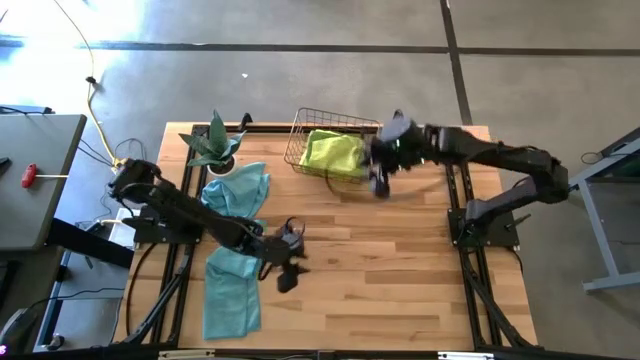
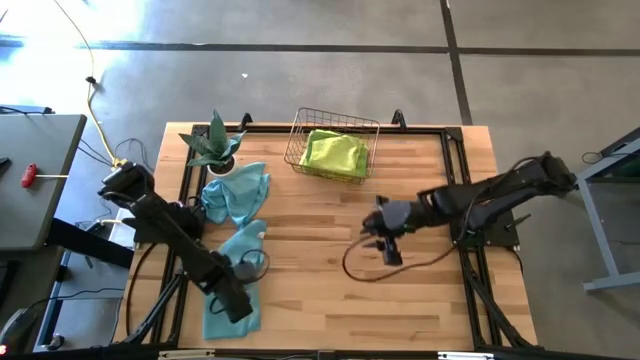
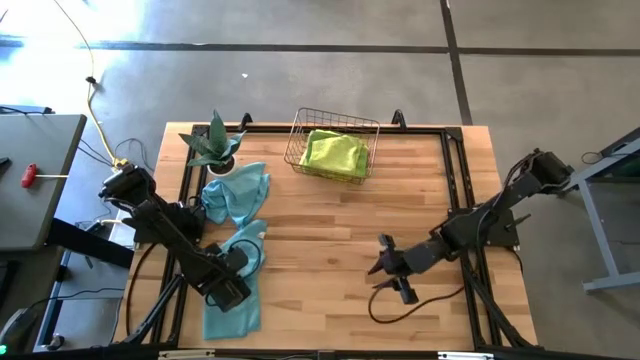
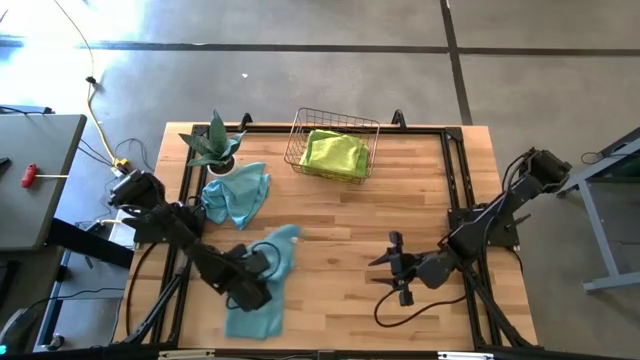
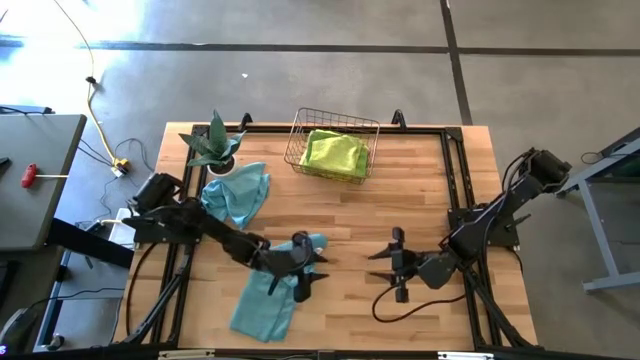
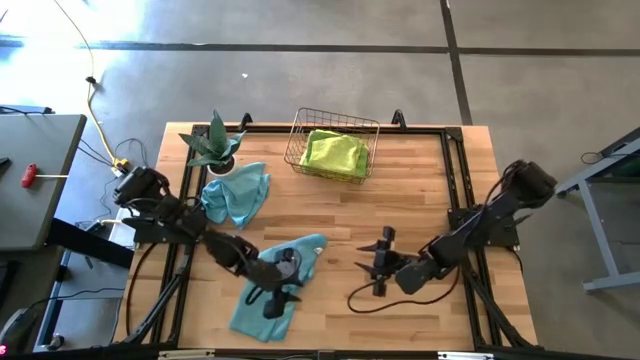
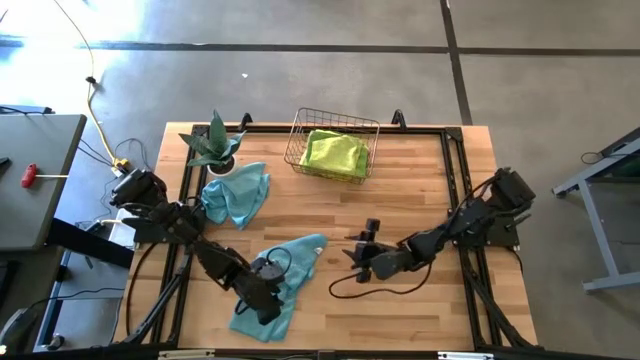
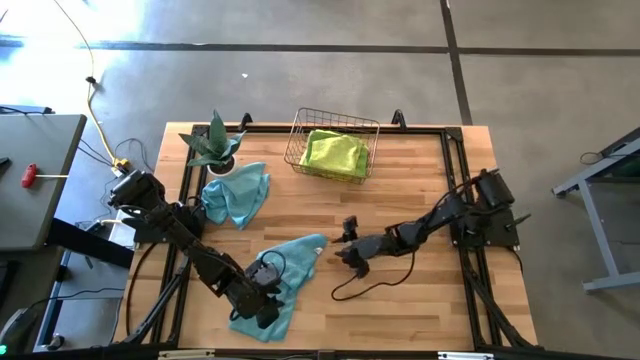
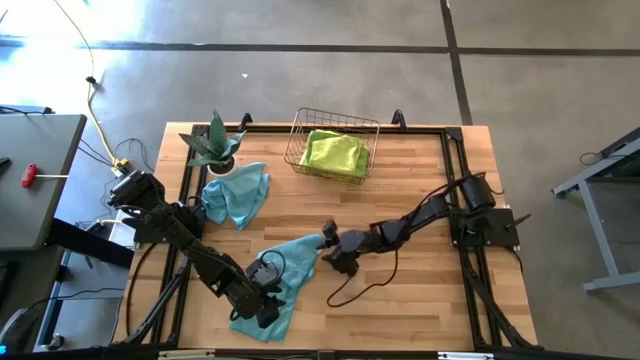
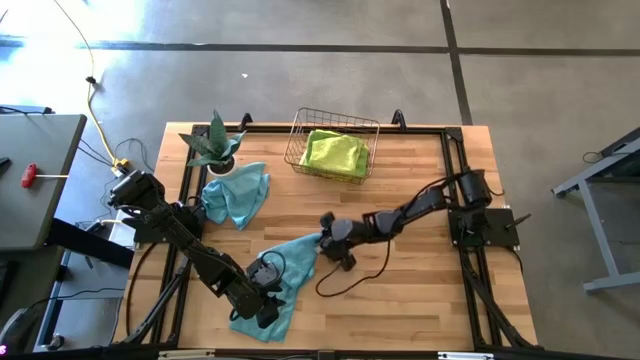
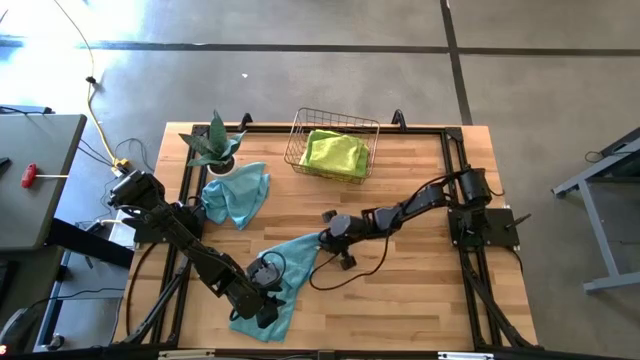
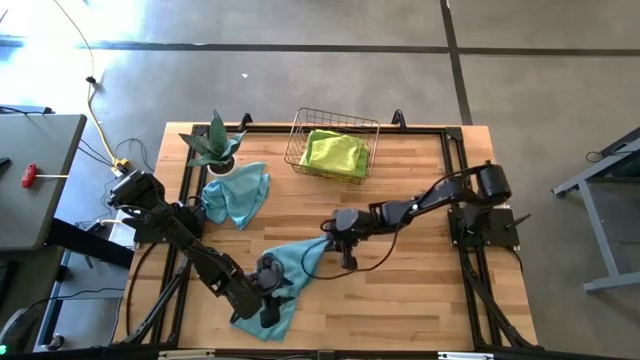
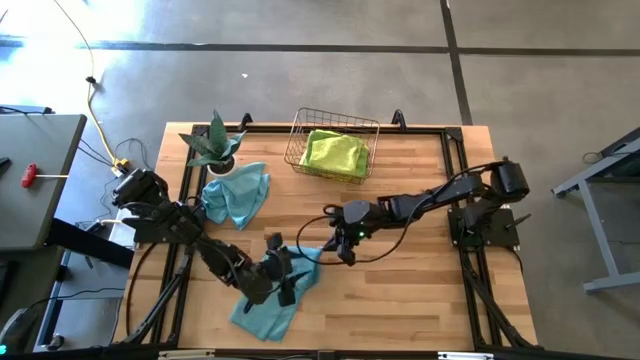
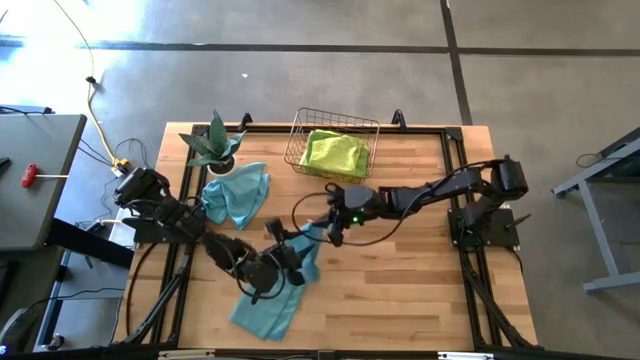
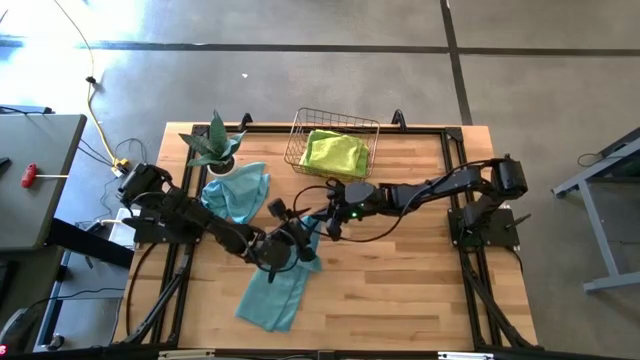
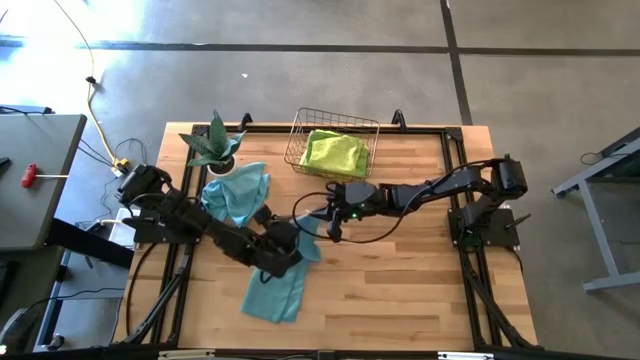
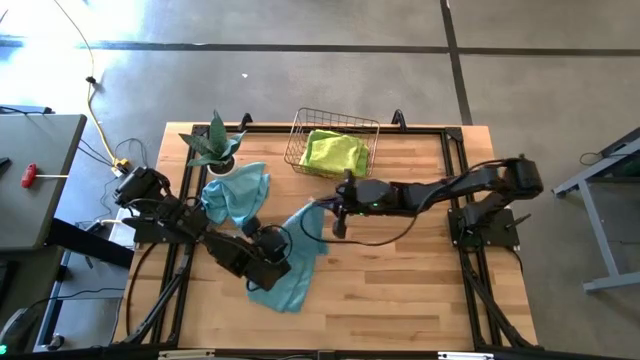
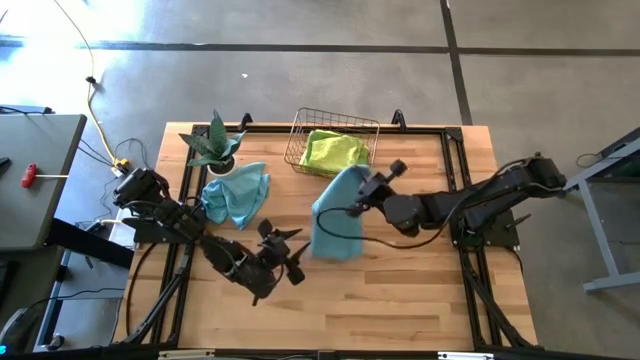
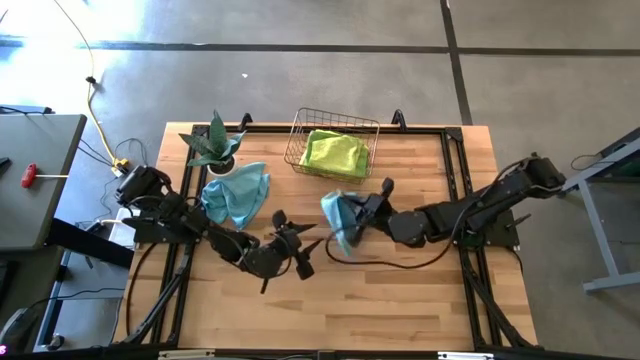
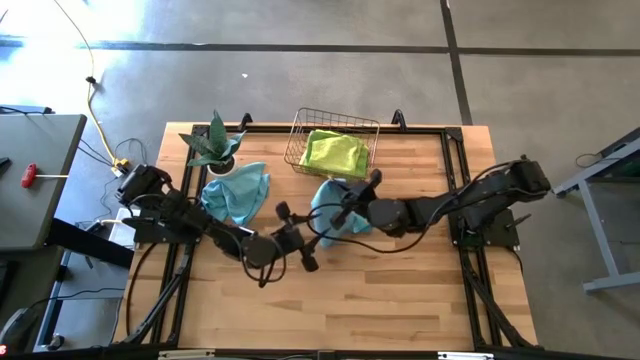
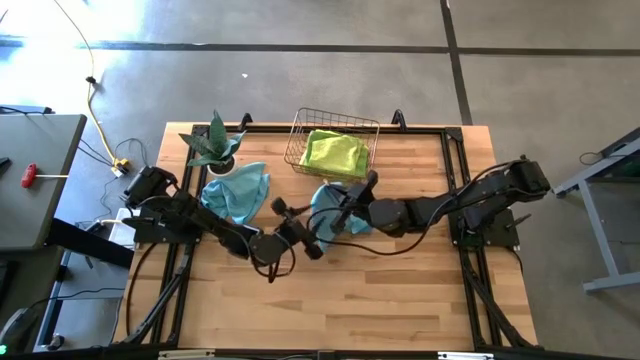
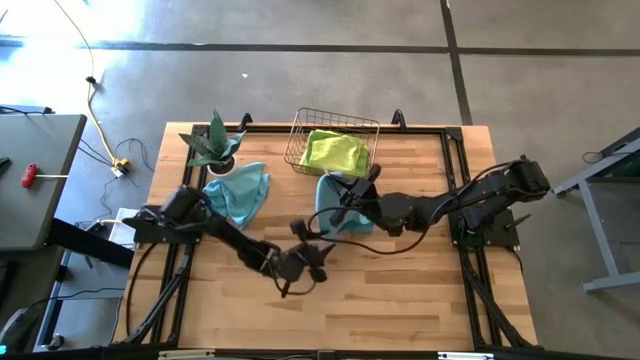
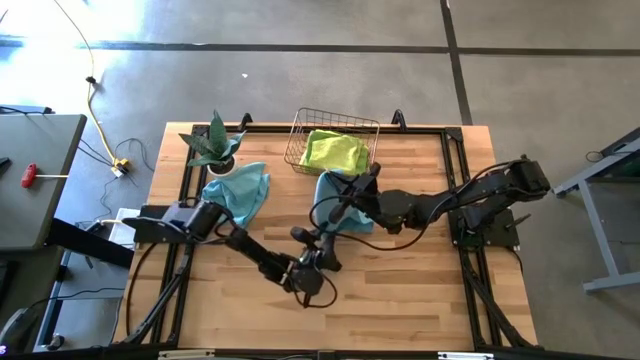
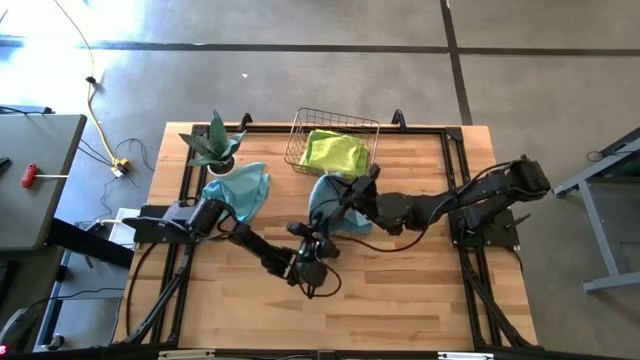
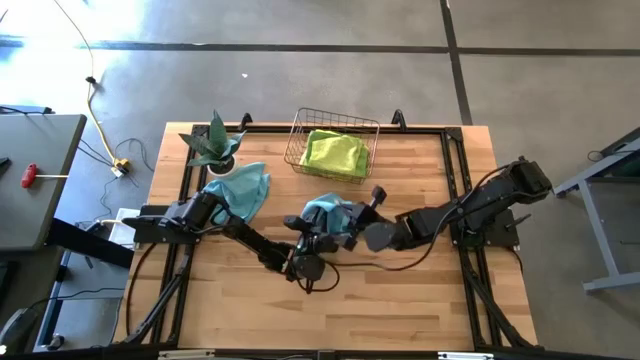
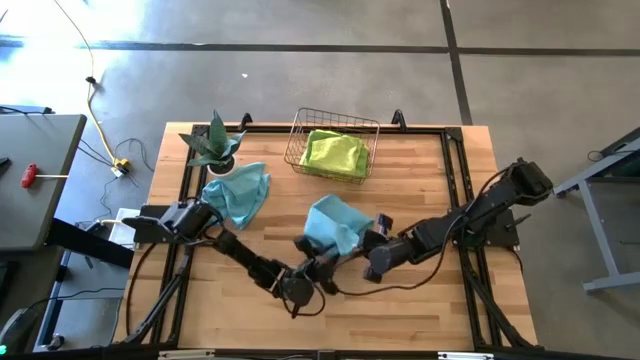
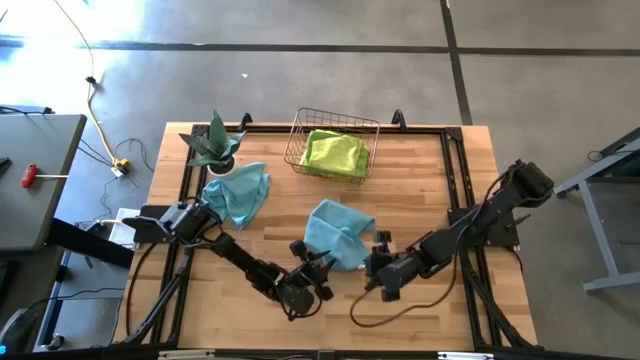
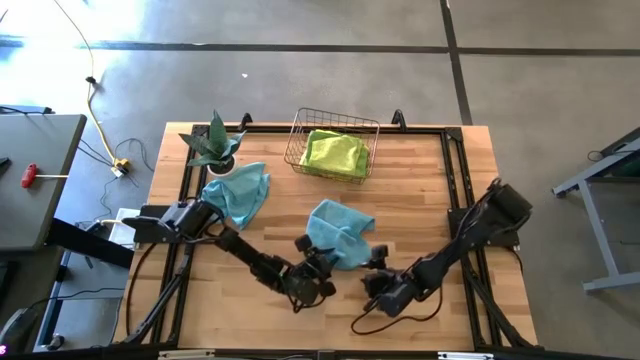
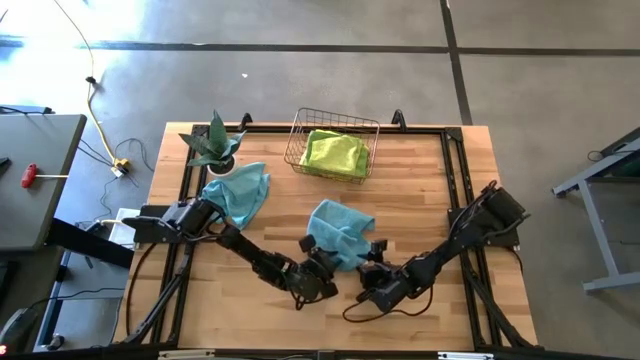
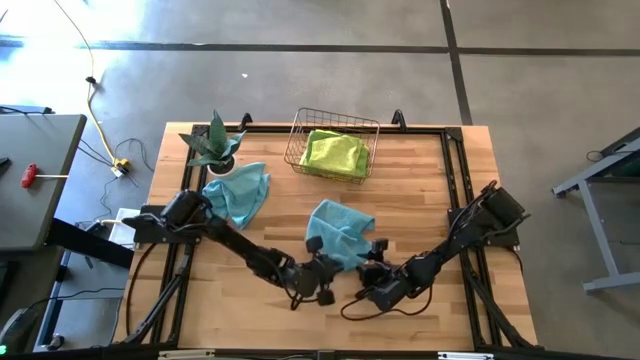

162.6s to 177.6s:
Task: Fold microfiber towels
Fold the bottom blue microfiber towel

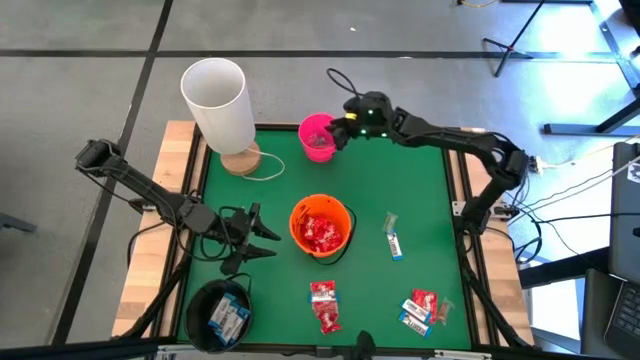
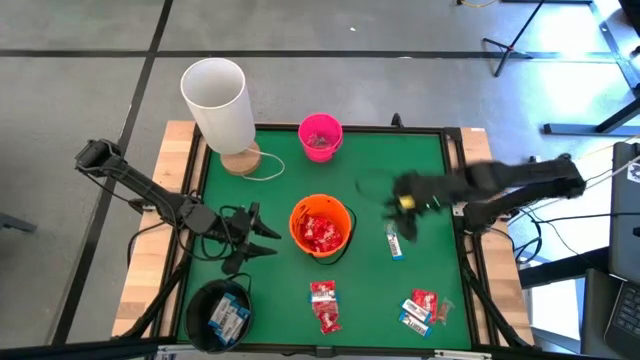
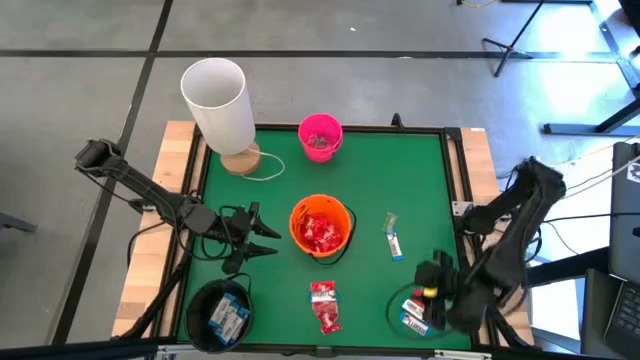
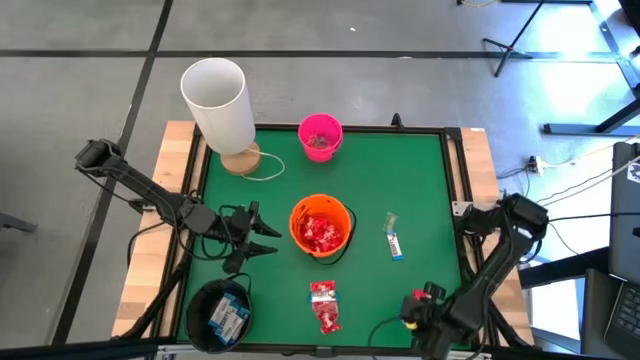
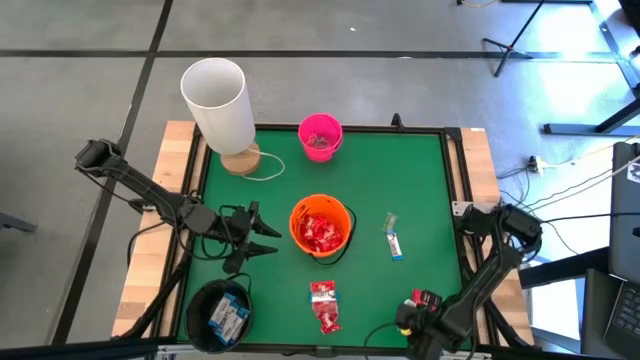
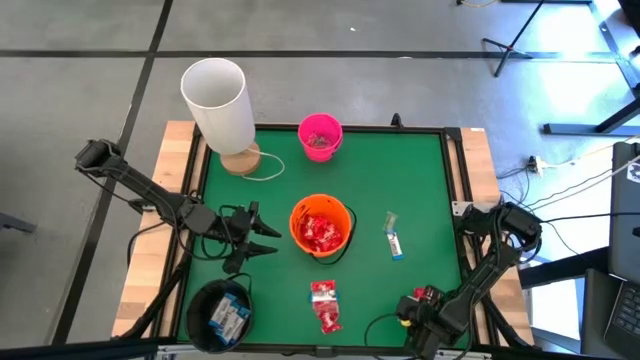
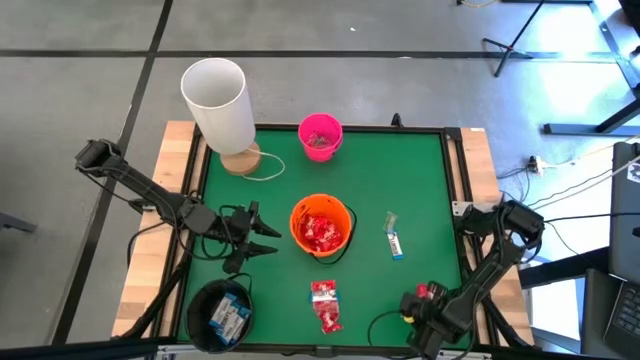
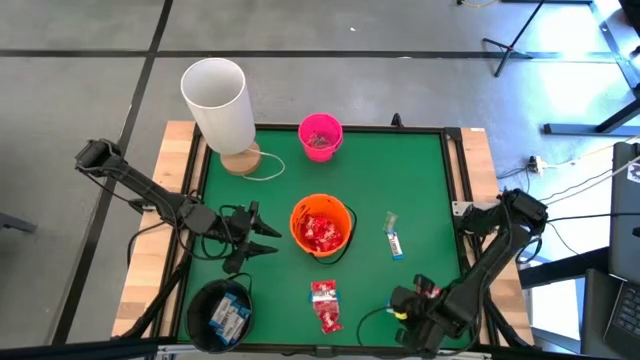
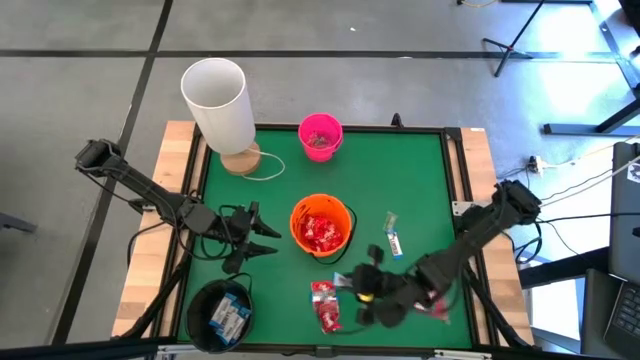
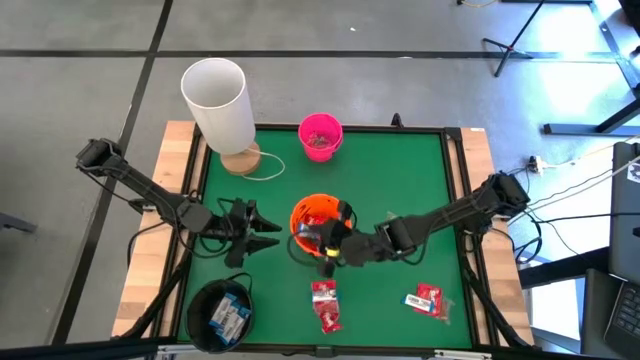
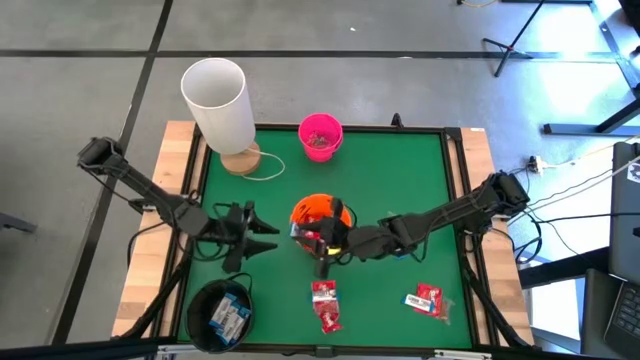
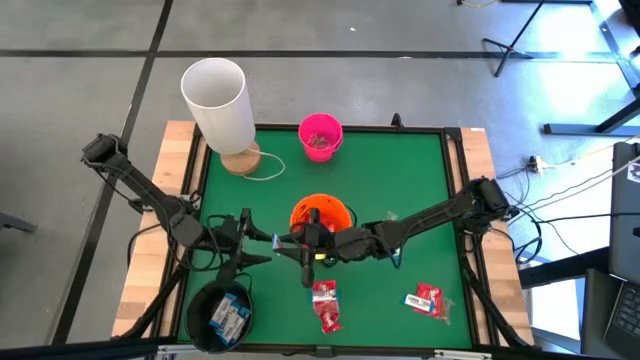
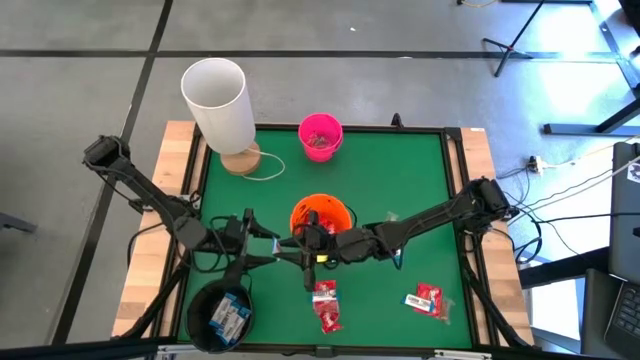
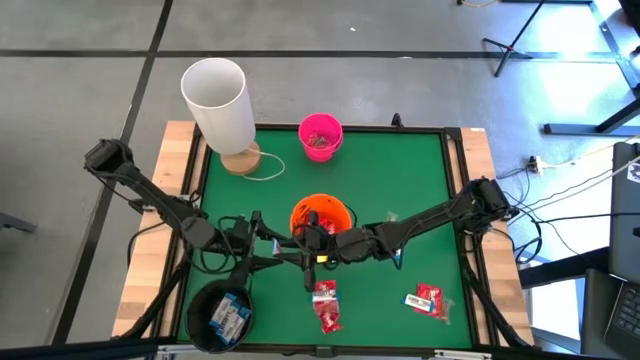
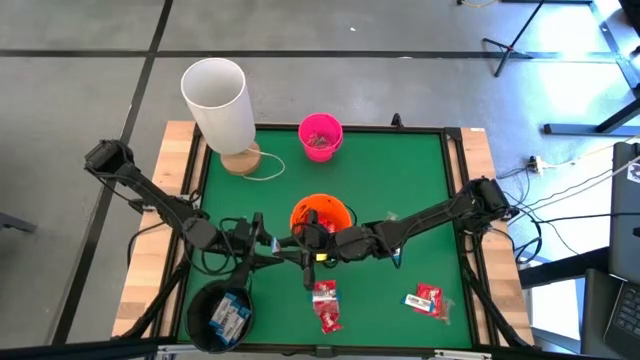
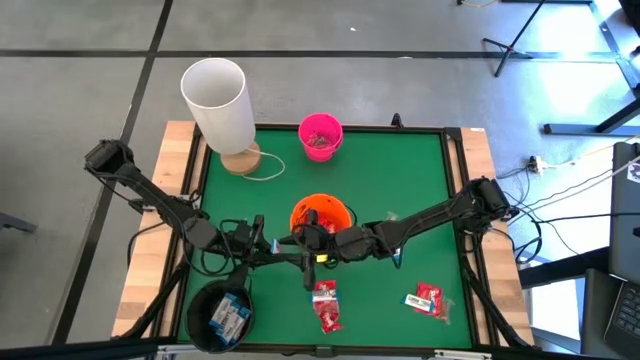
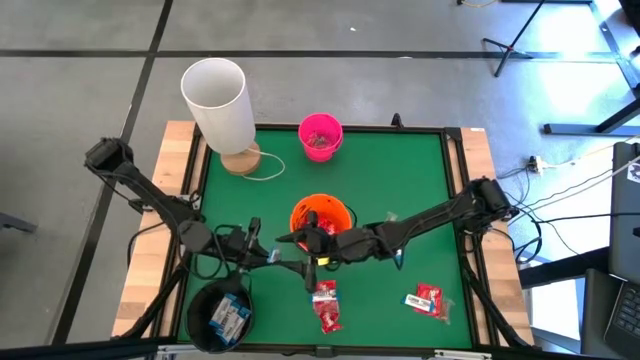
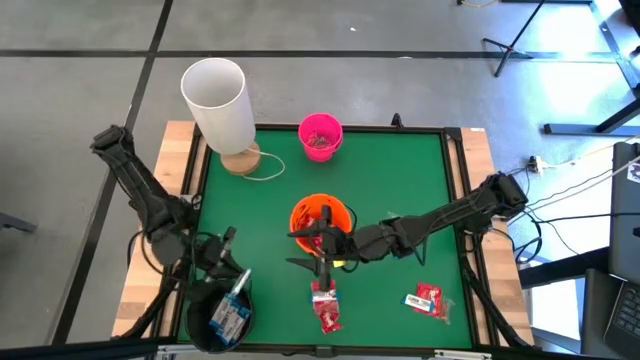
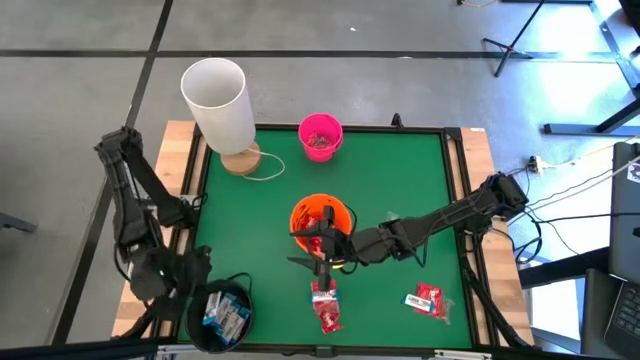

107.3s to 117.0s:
Task: Sort candy
Put the white chocolate into the black bucket
